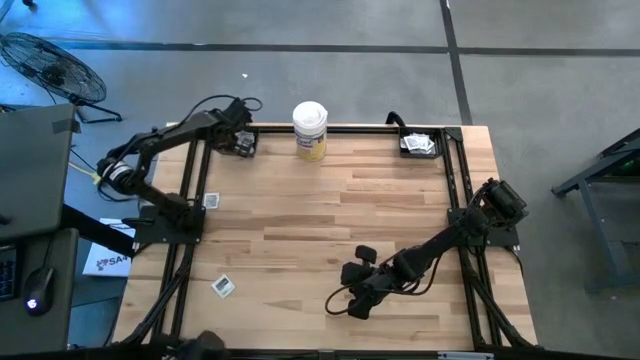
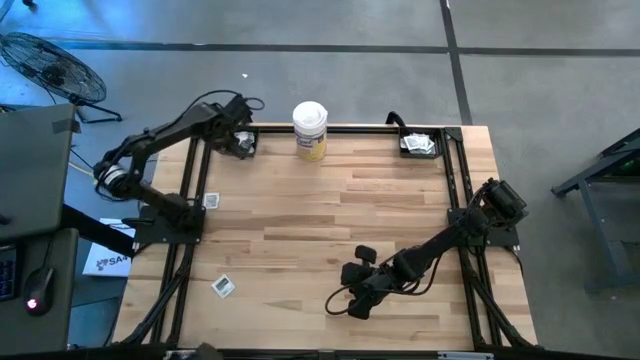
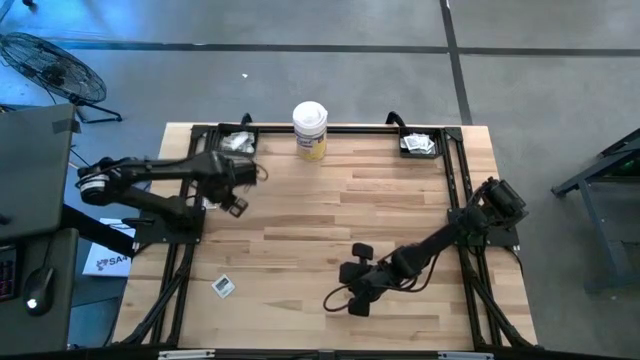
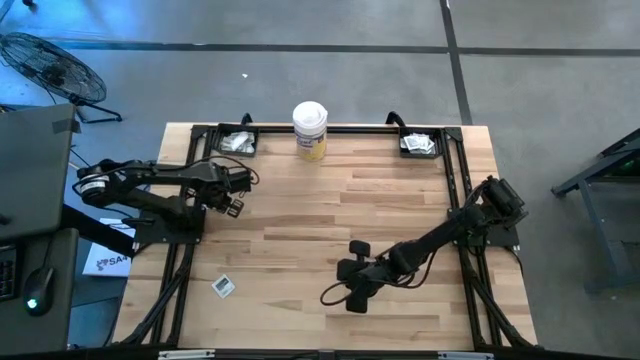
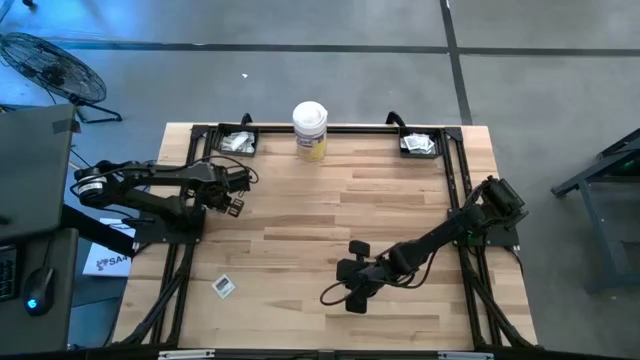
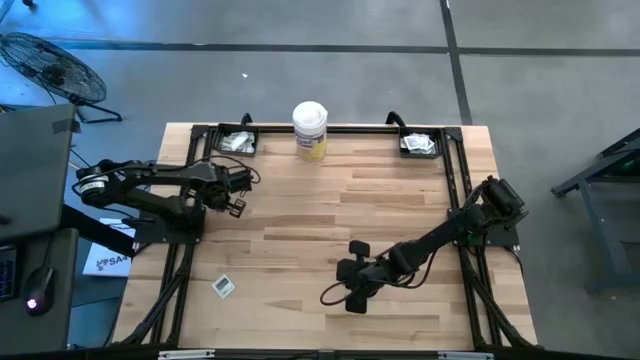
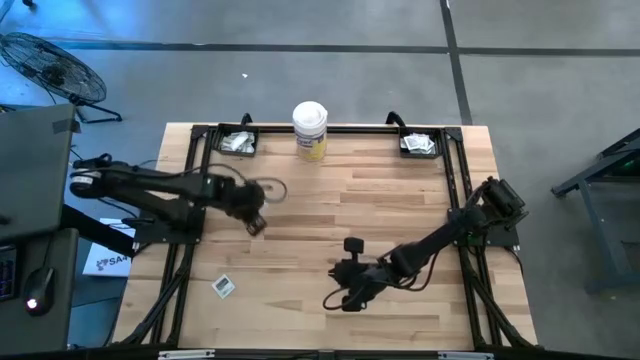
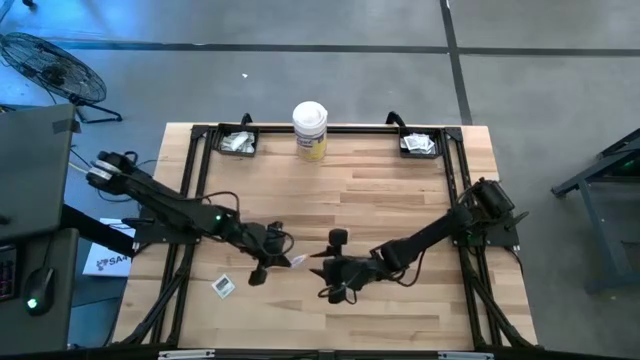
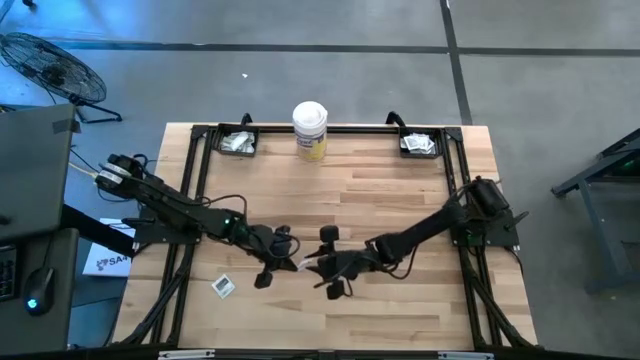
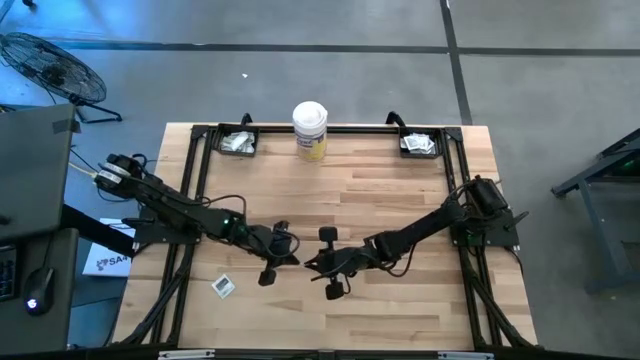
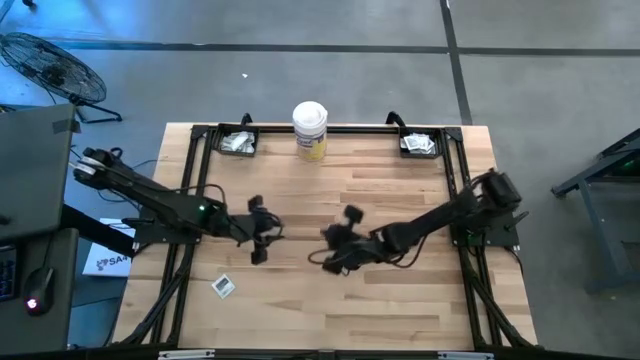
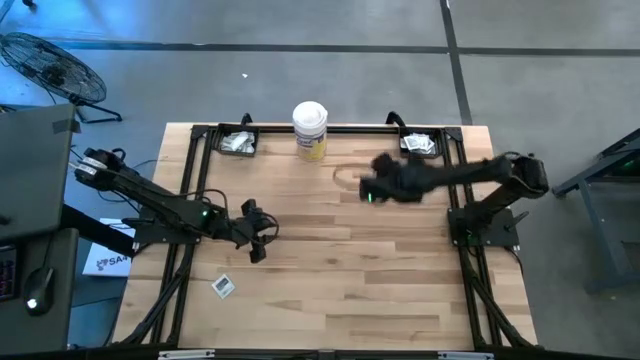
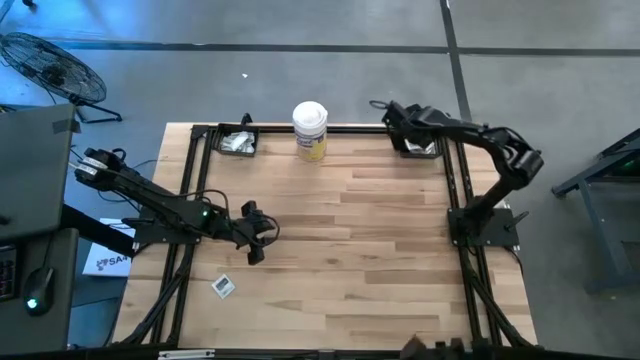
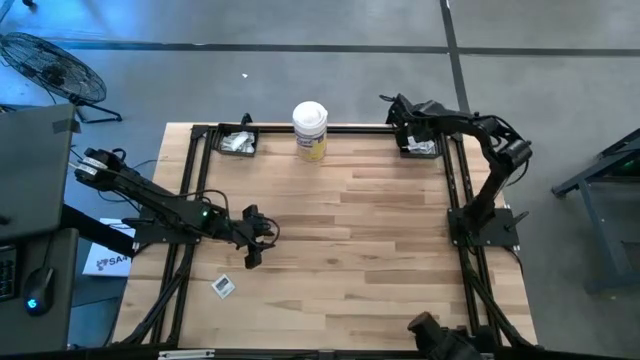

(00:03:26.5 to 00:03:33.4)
Task: Pick & Place First Aid Supplies
Put the black towelette pack into the right black basket

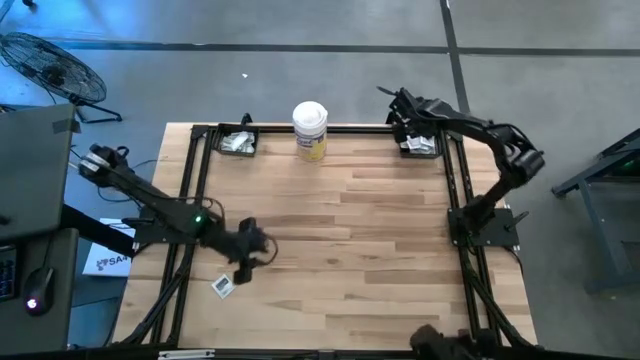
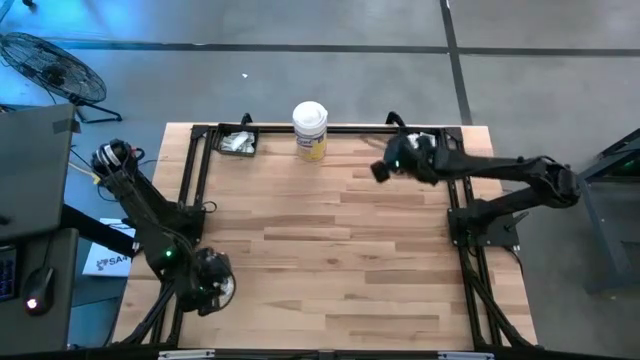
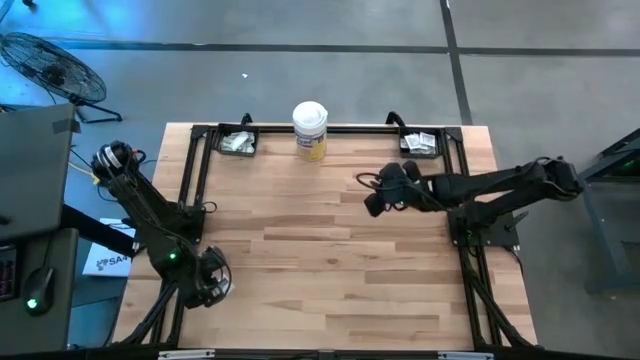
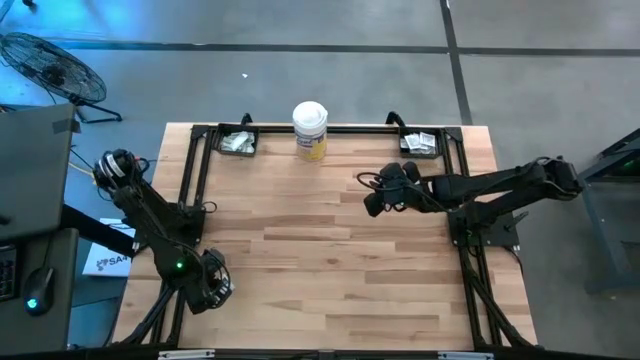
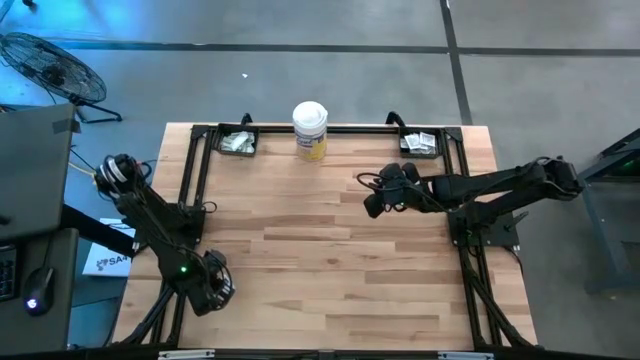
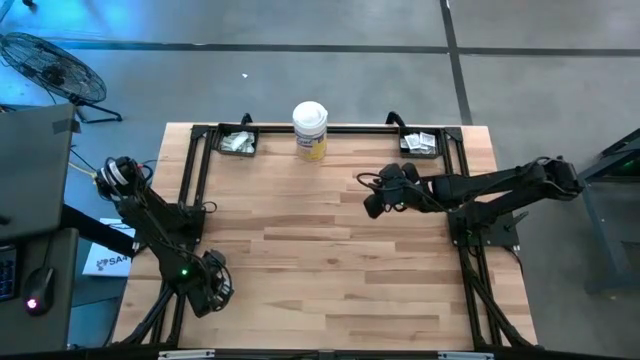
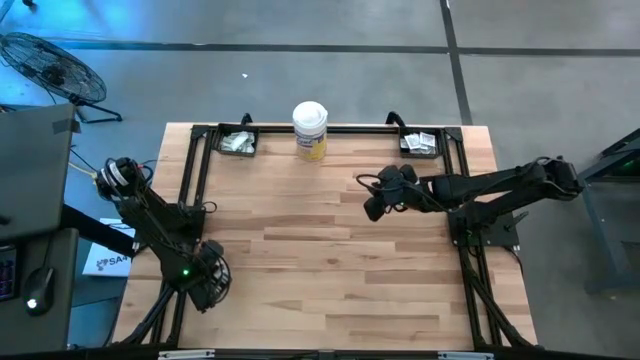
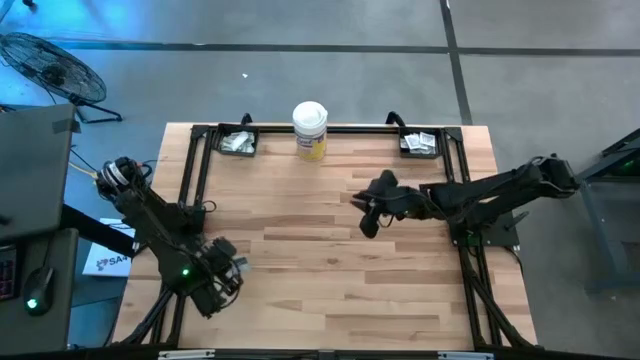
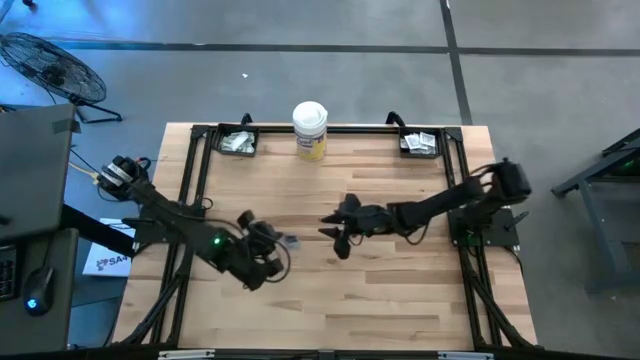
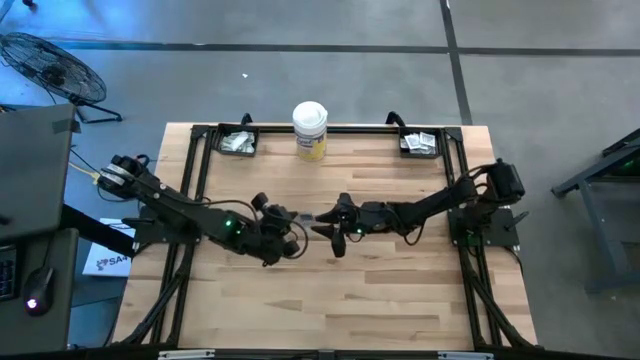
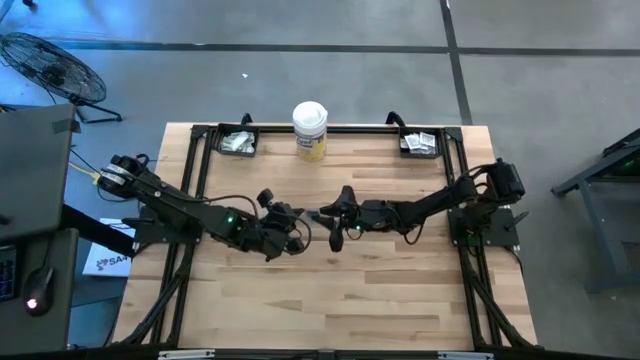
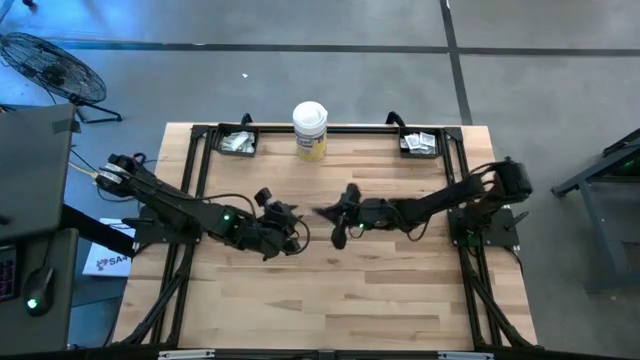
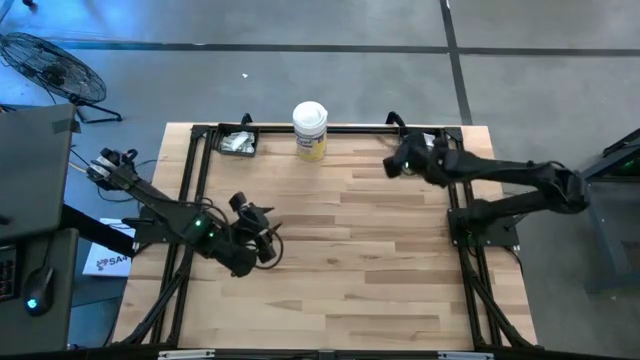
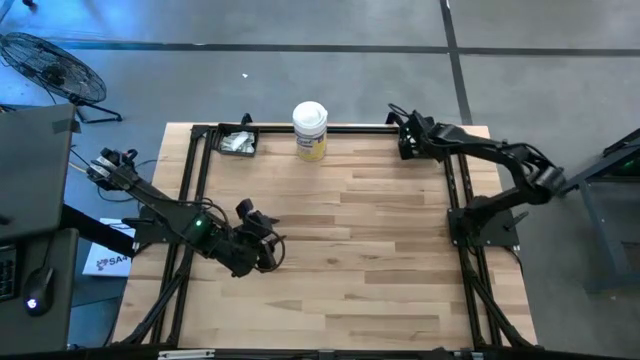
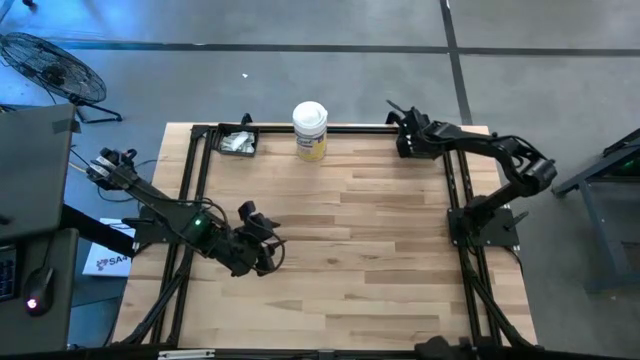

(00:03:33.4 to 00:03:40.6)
Put the black towelette pack into the right black basket

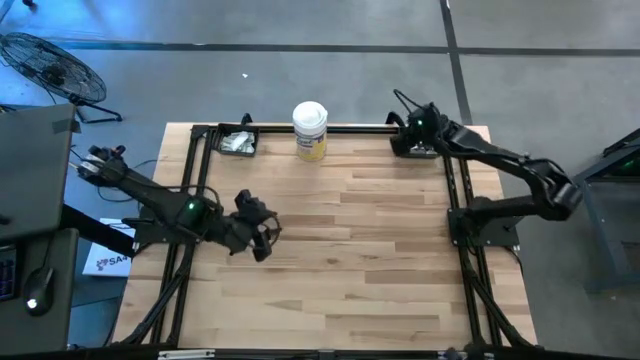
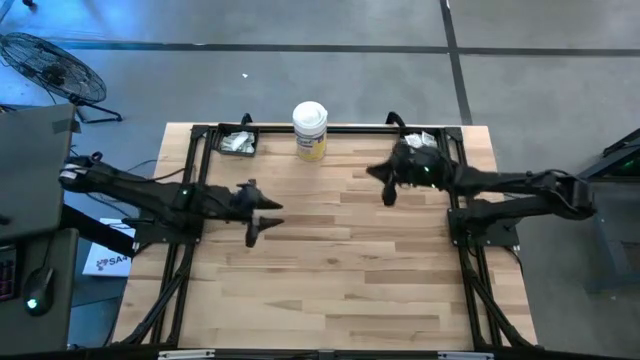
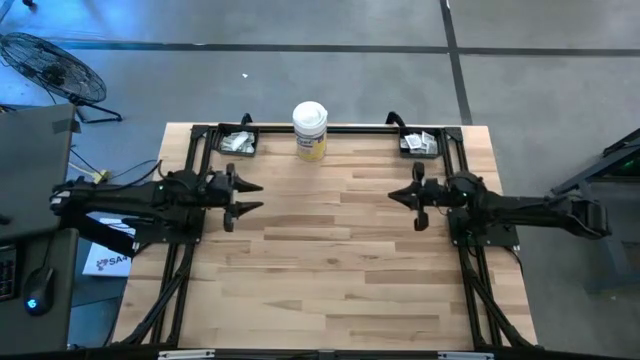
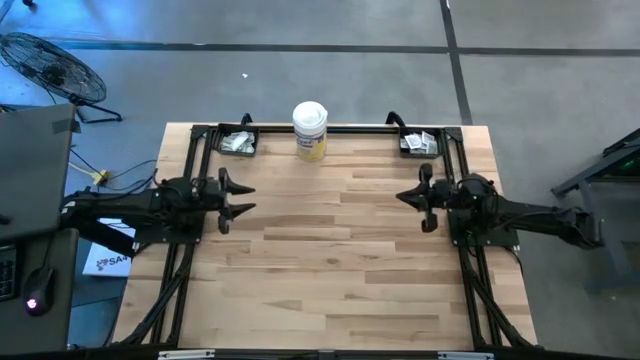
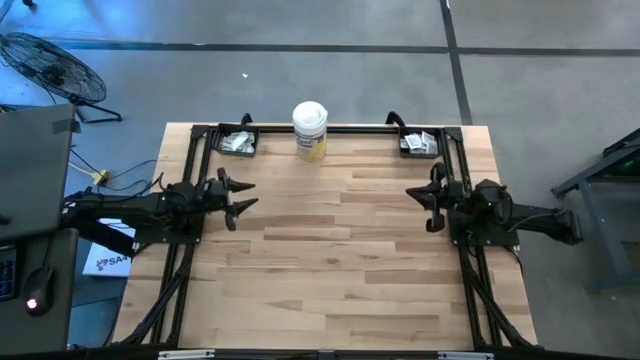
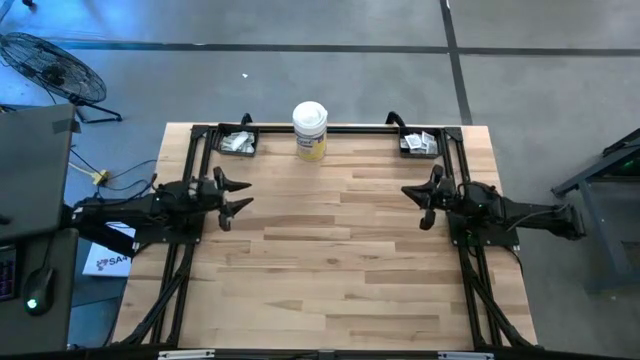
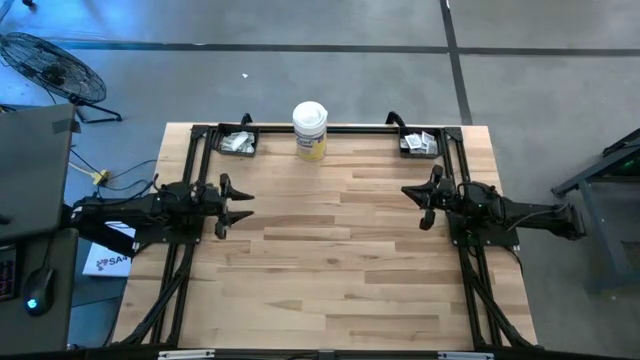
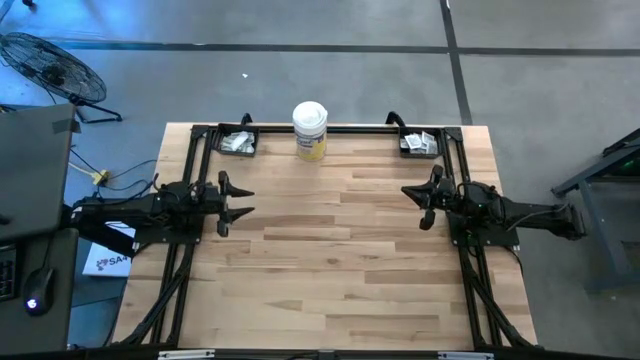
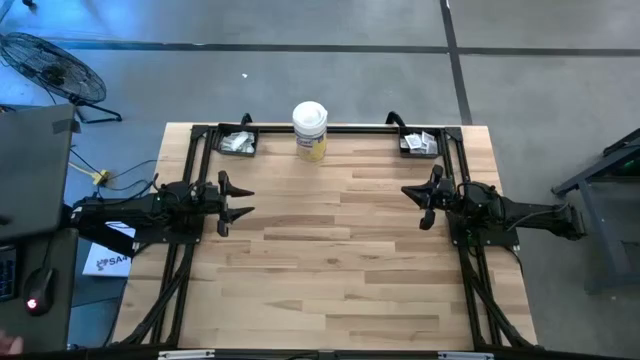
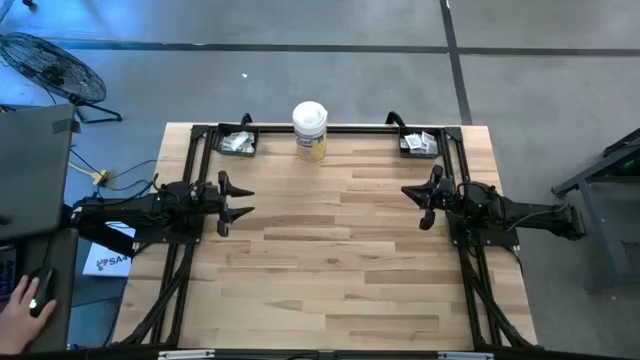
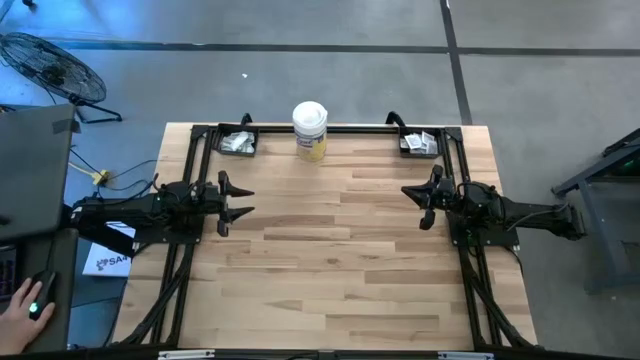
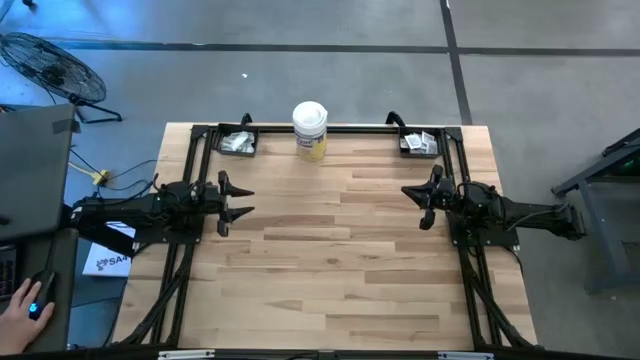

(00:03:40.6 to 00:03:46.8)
Return to Home Position
